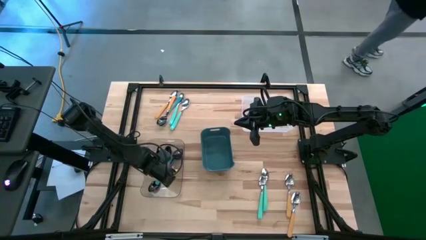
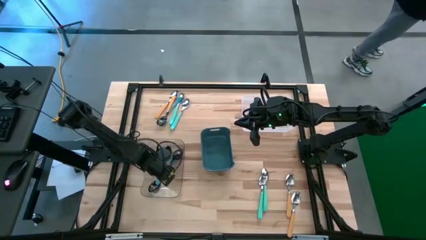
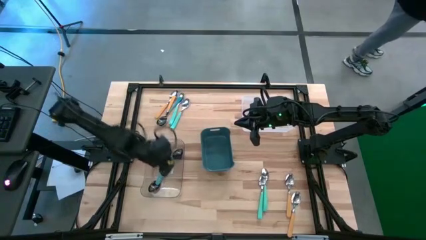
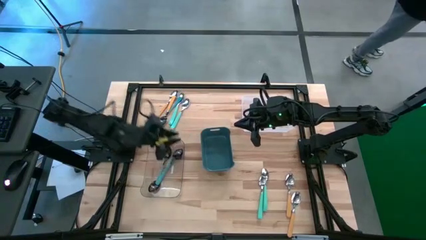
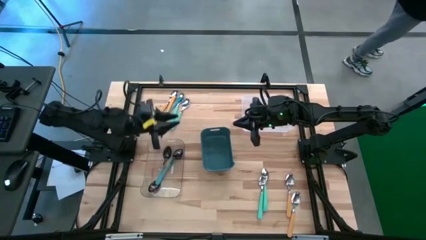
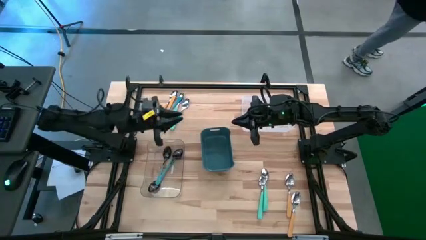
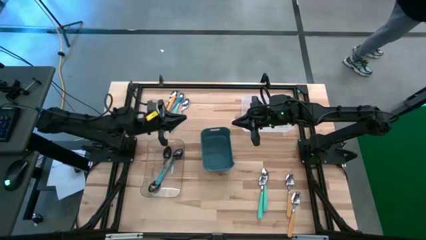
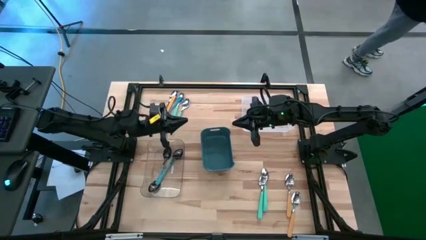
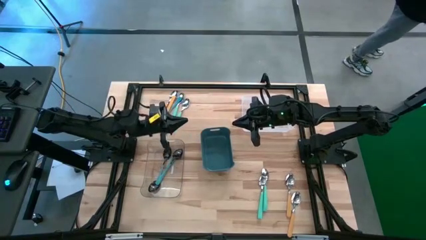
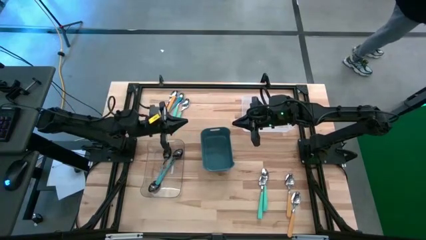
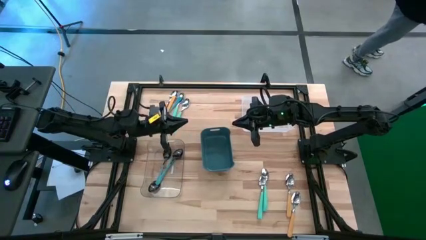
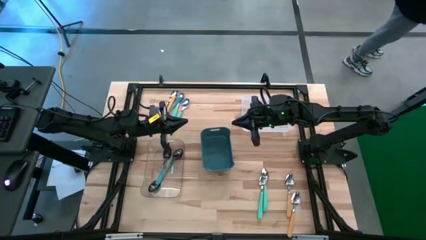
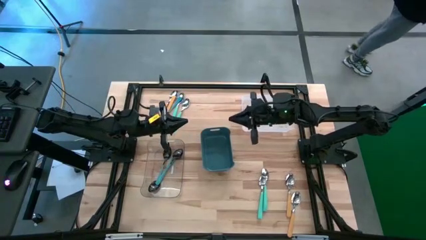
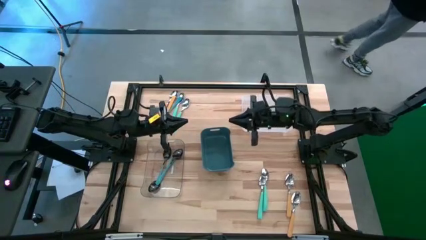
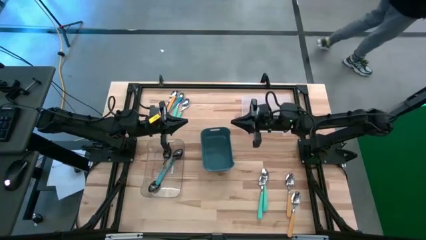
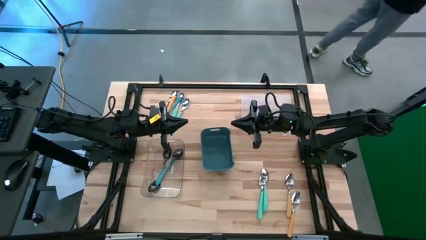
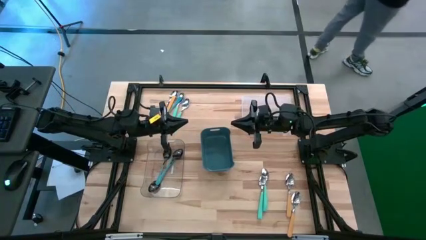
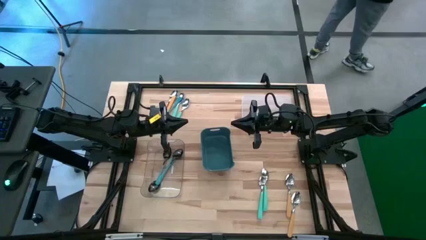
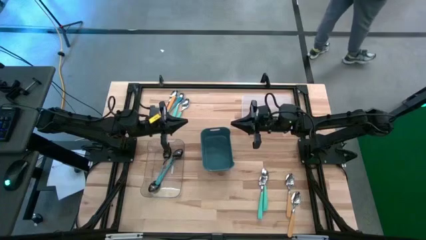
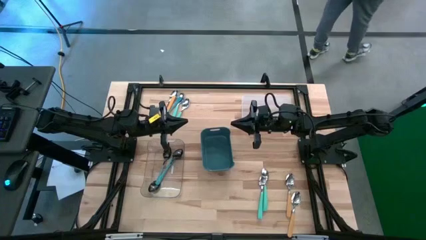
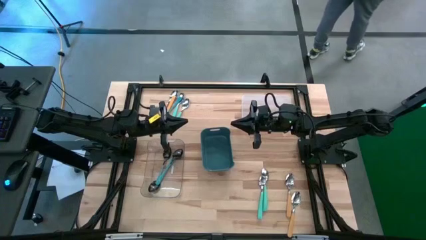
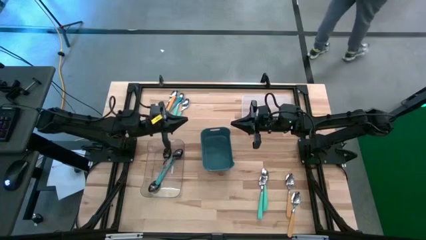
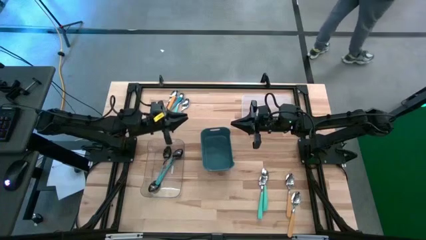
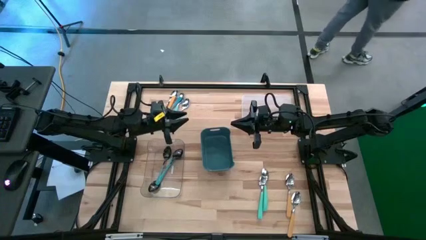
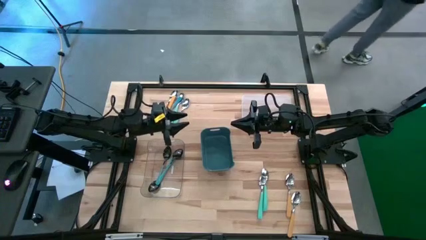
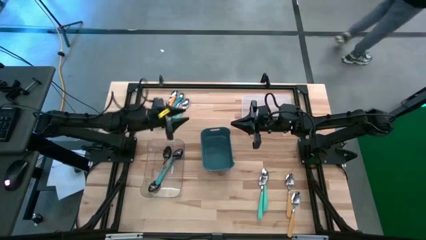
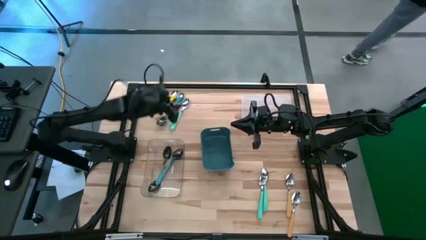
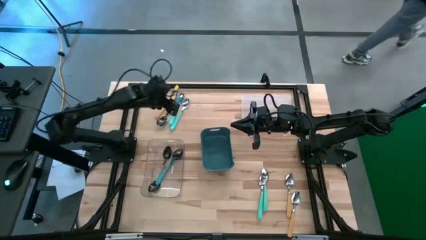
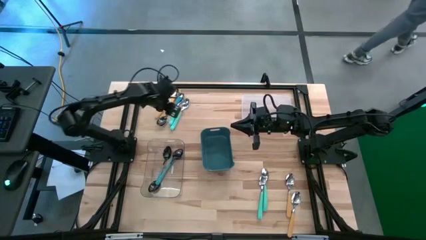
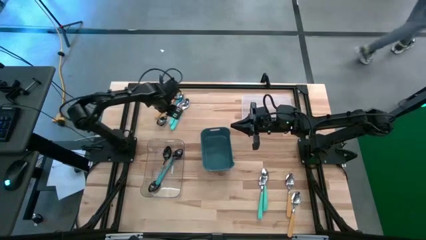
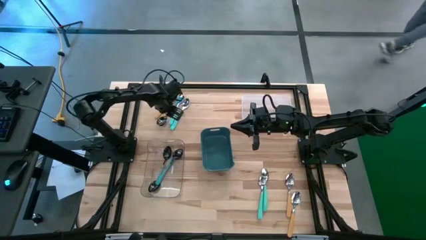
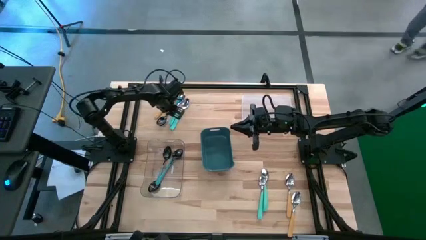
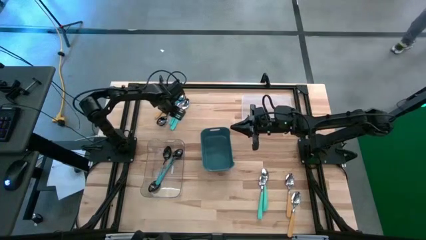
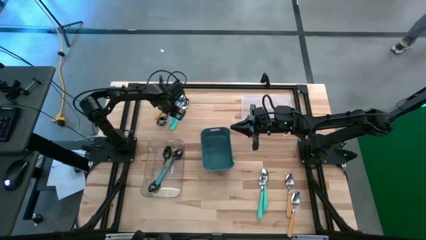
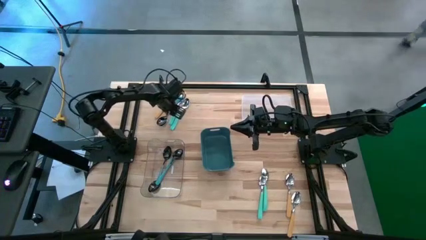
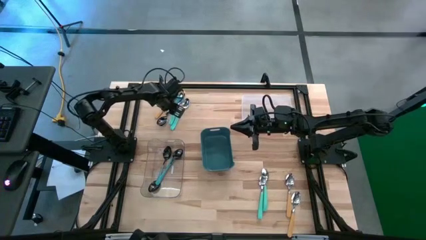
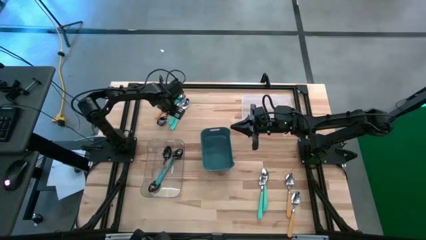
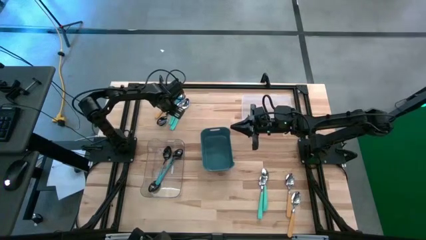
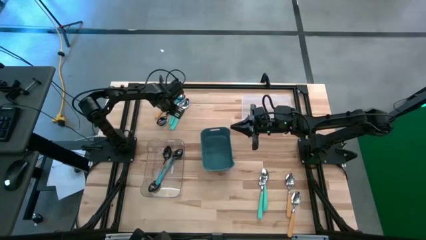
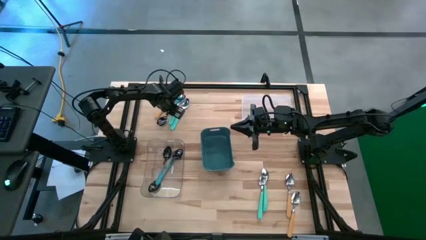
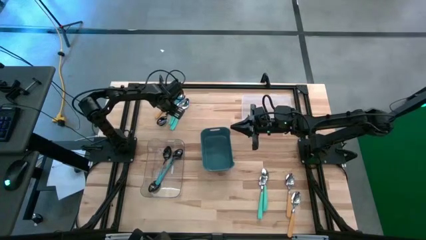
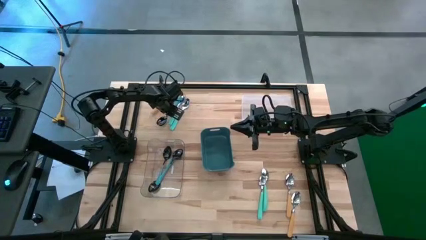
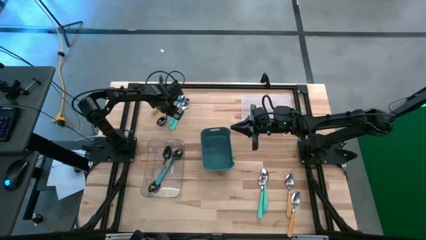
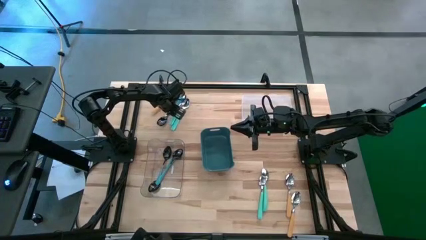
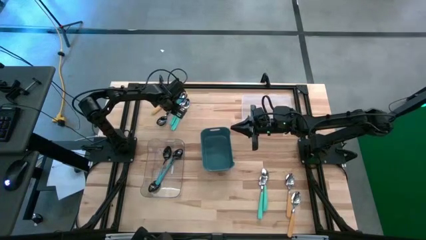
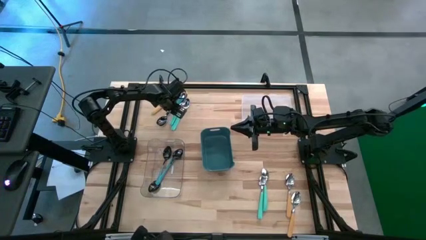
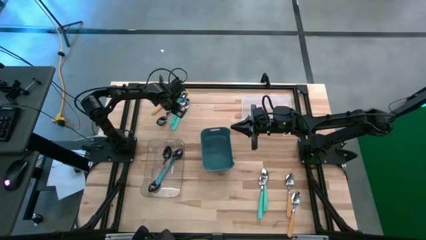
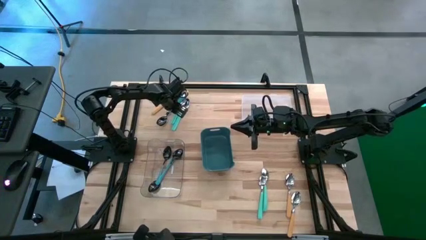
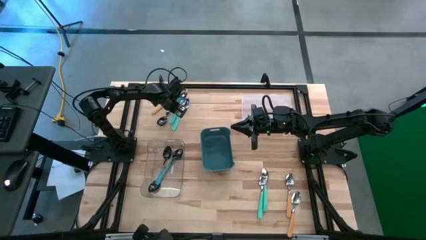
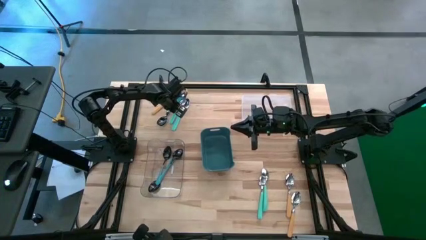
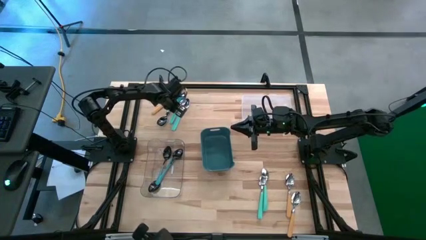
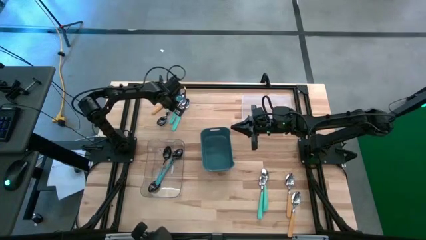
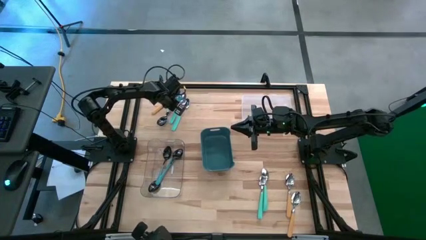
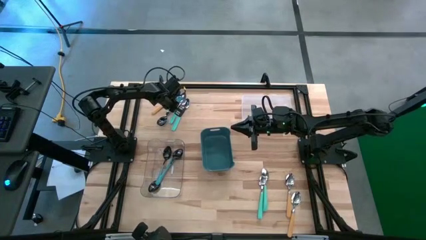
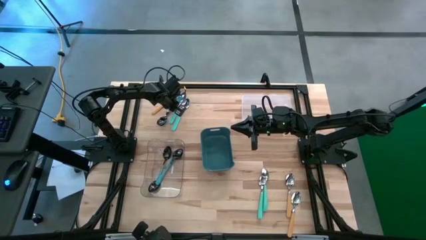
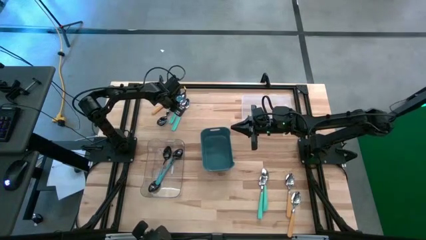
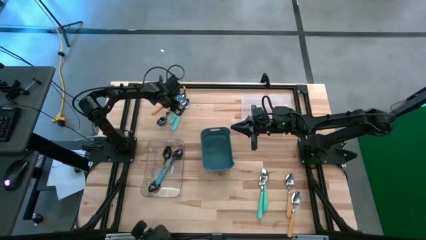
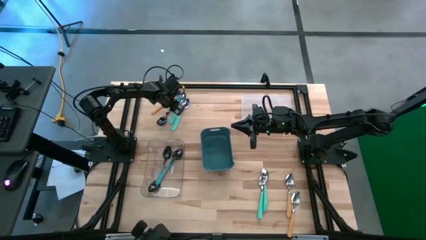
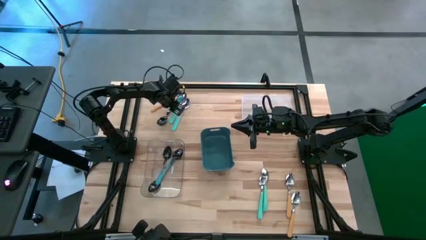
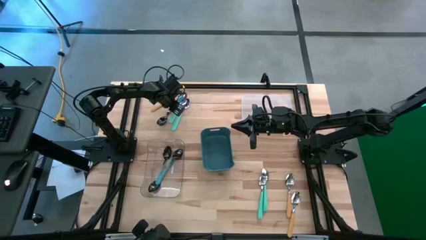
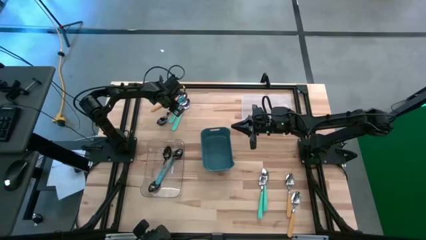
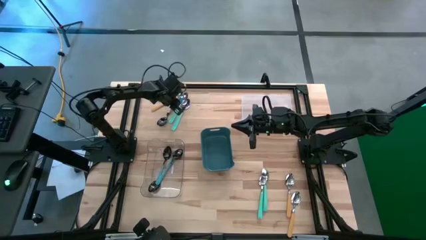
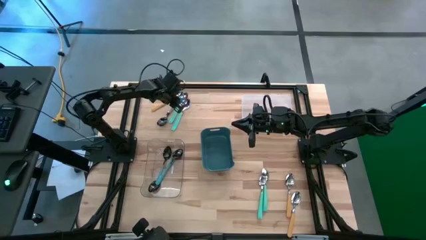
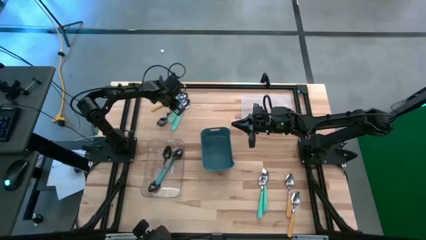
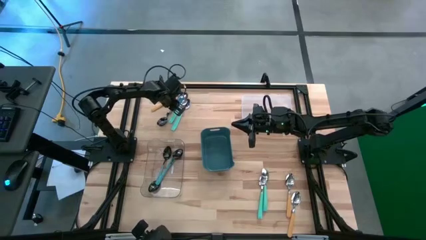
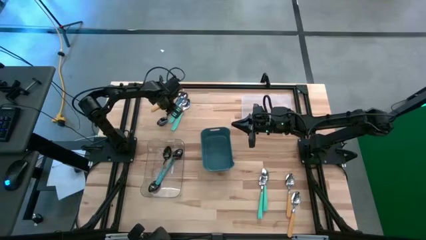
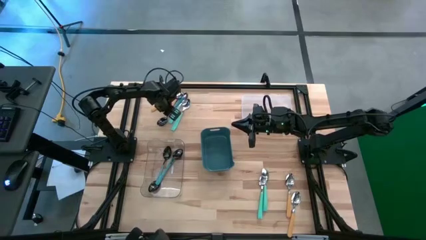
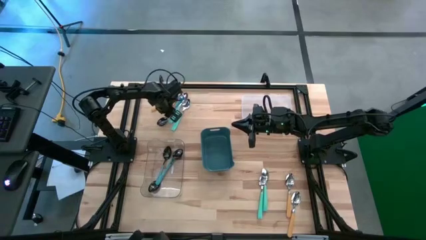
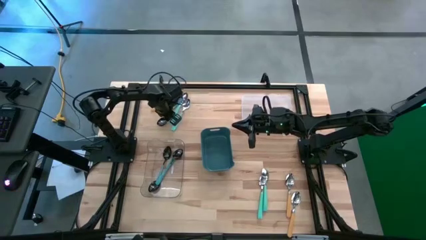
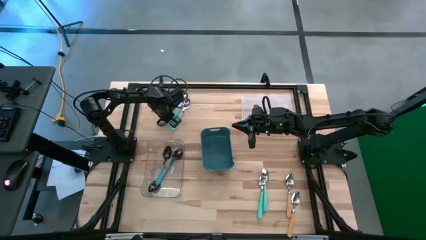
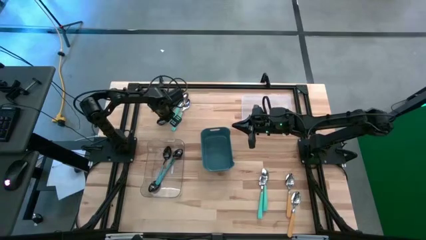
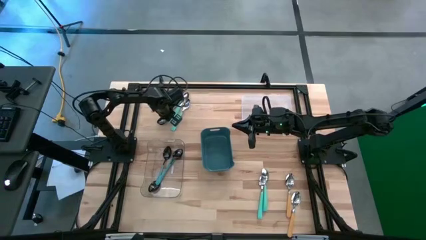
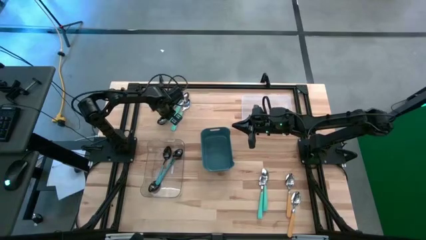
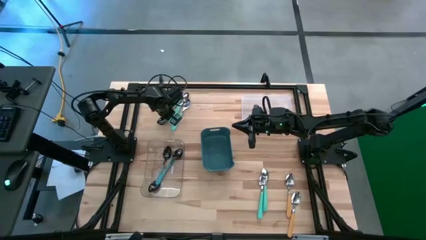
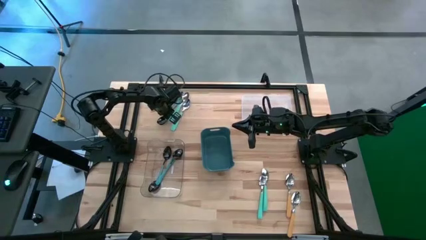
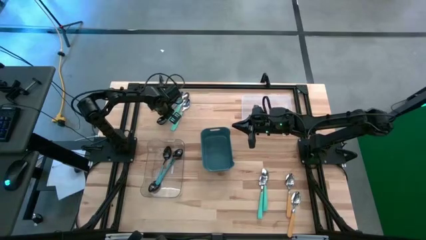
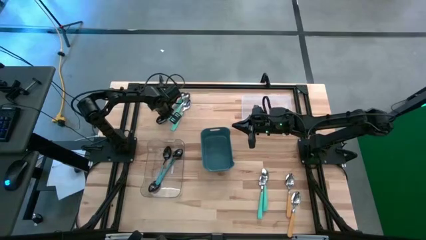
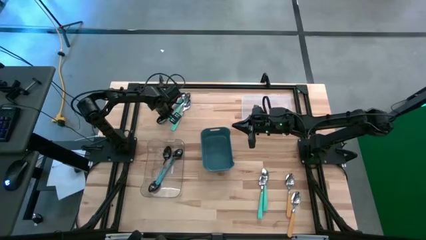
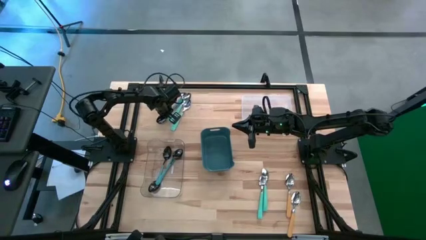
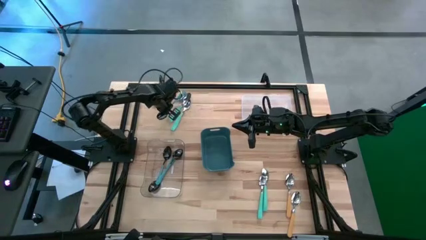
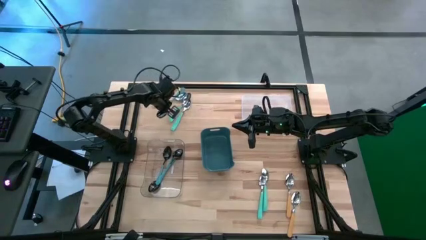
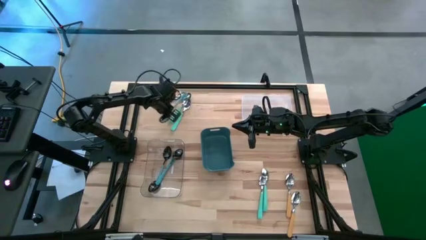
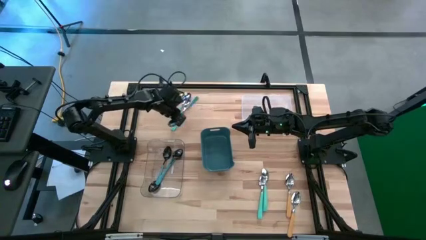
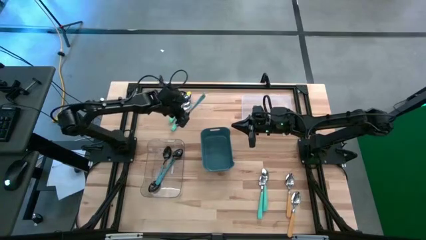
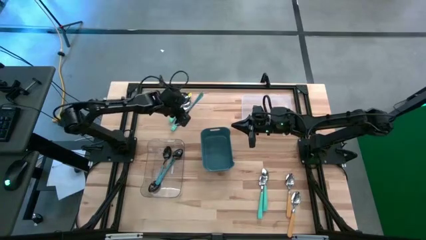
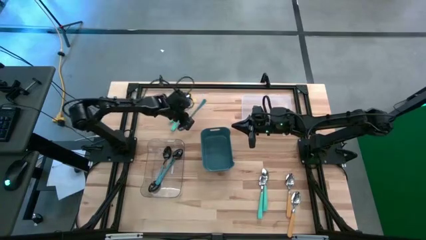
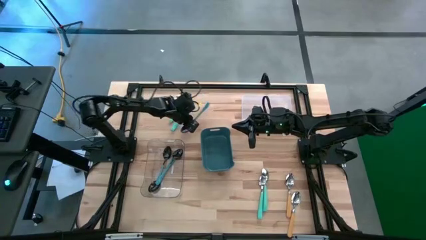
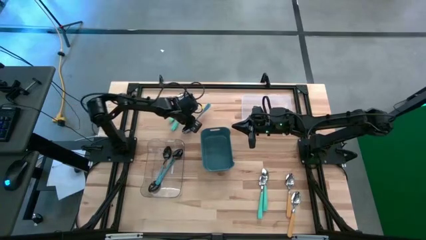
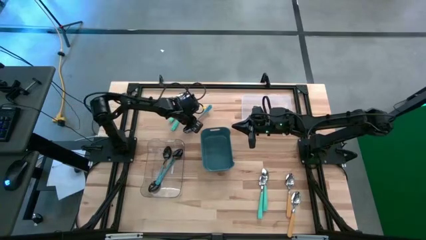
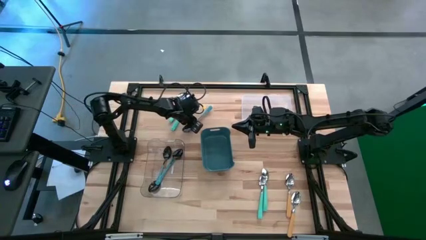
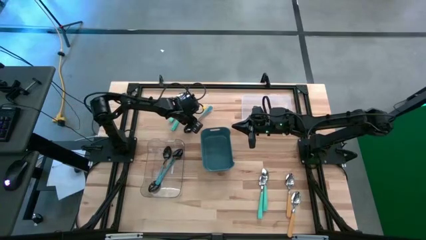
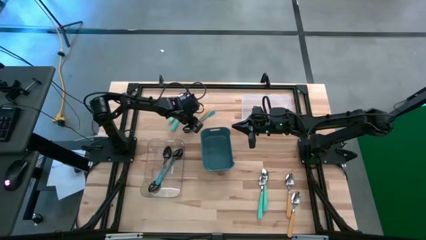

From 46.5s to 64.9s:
Task: Sort silverware by color (type)
Put the blue spoon into the transparent bin
